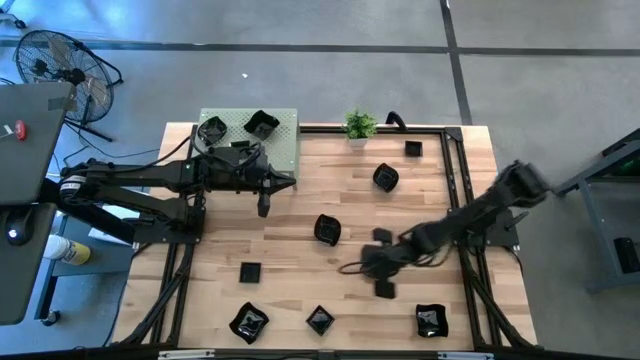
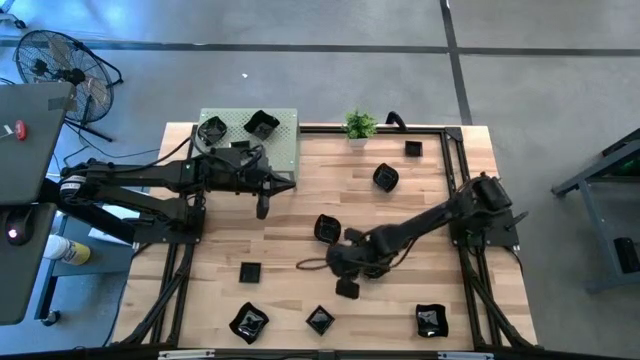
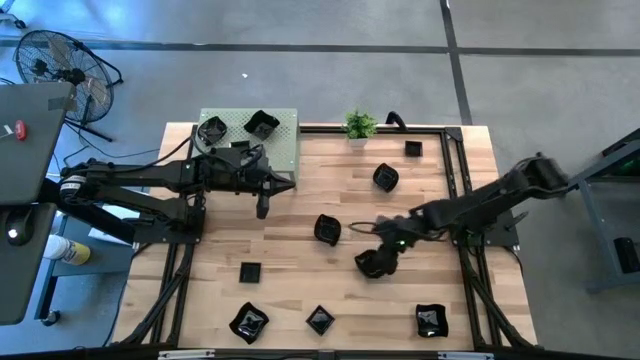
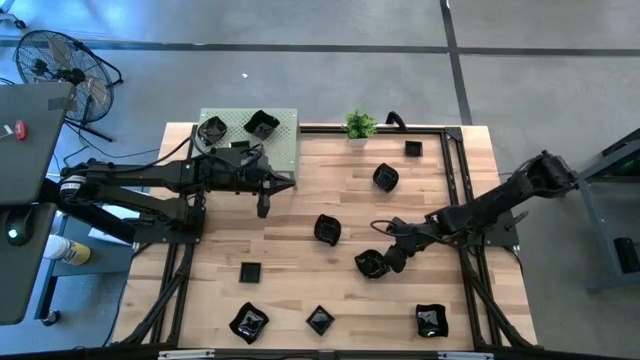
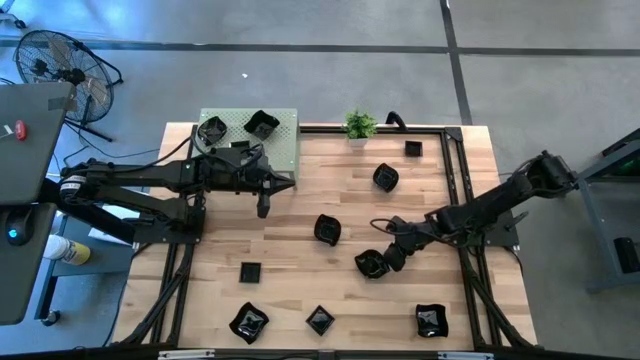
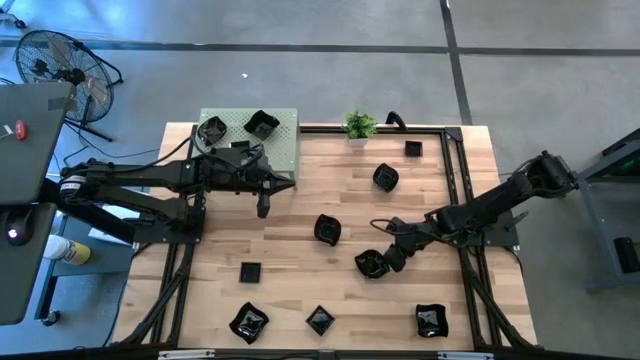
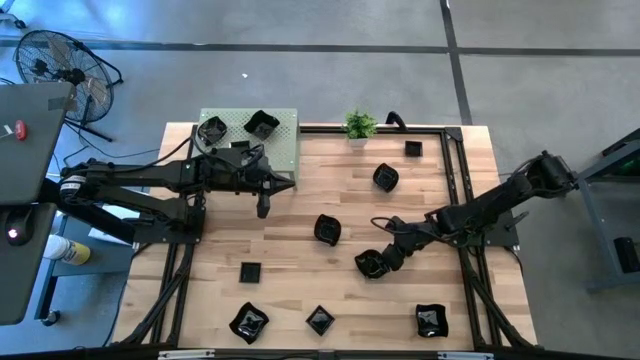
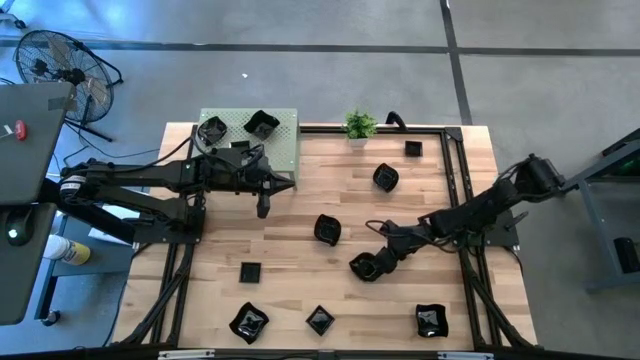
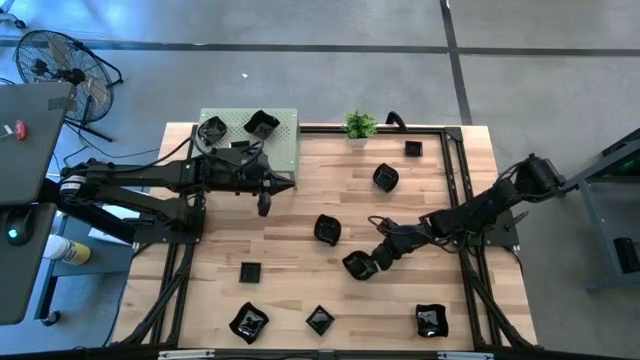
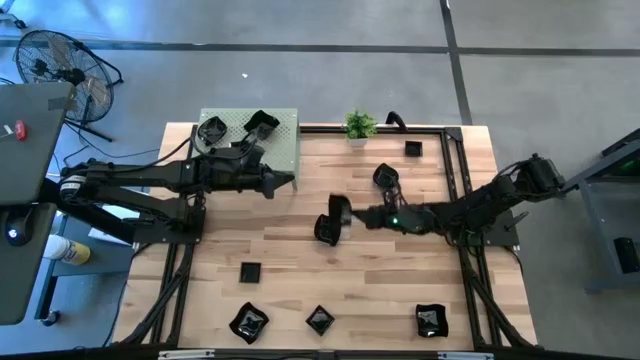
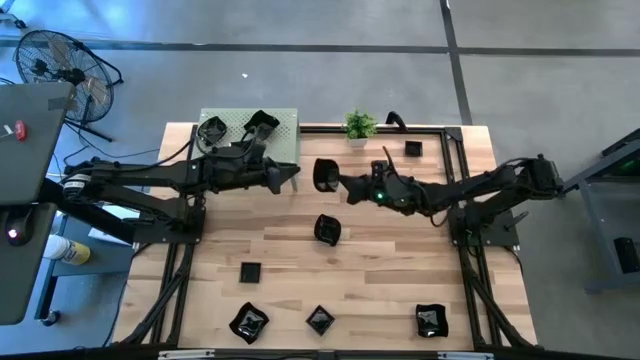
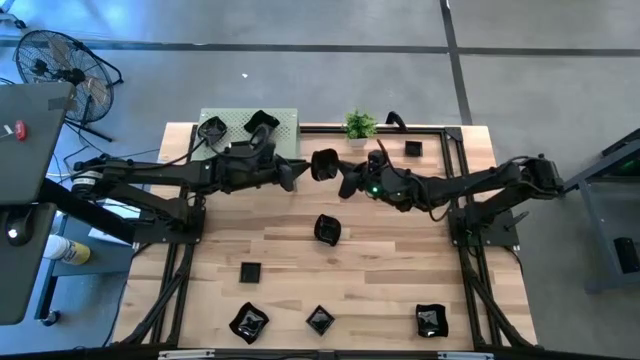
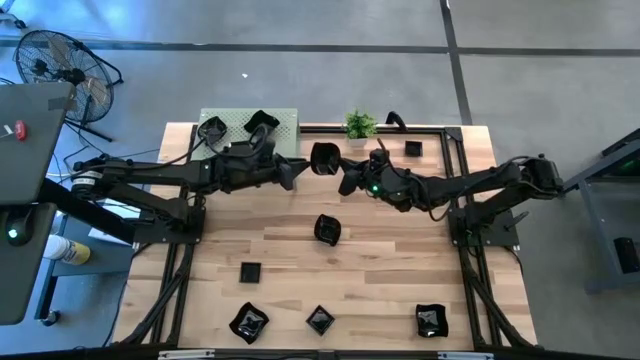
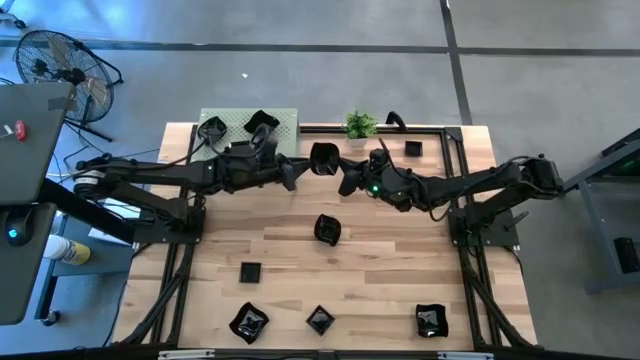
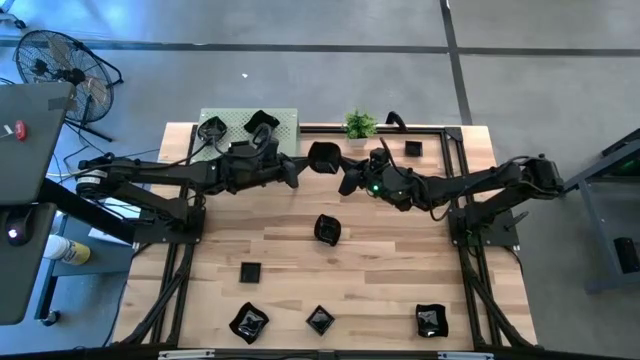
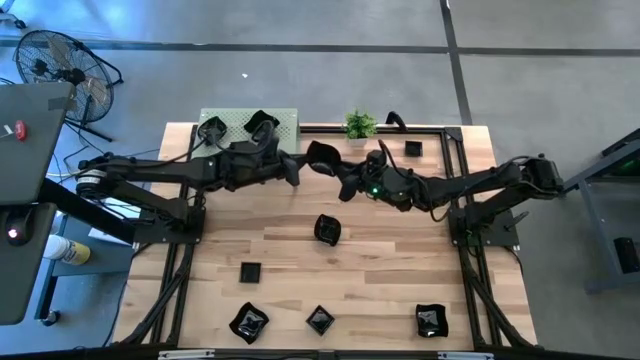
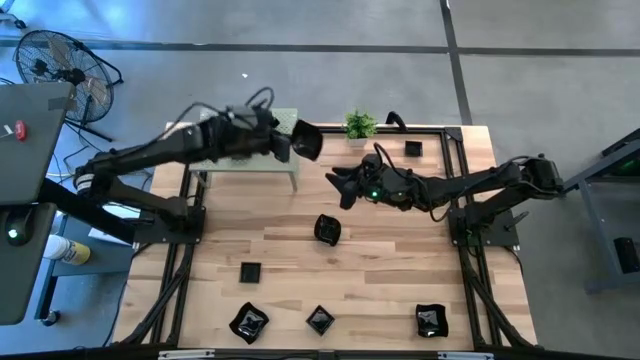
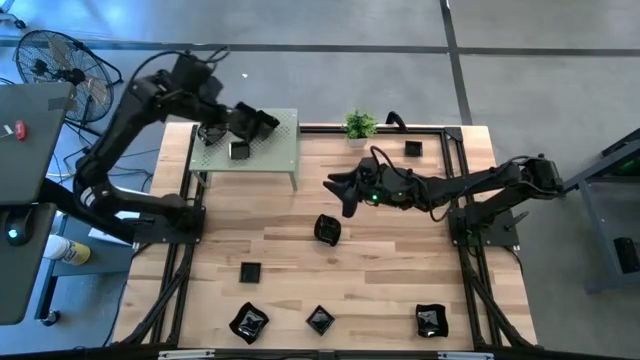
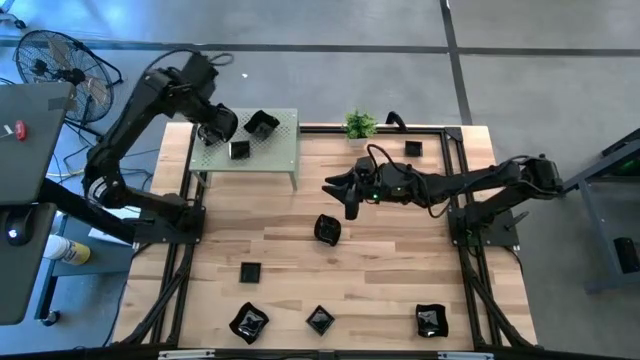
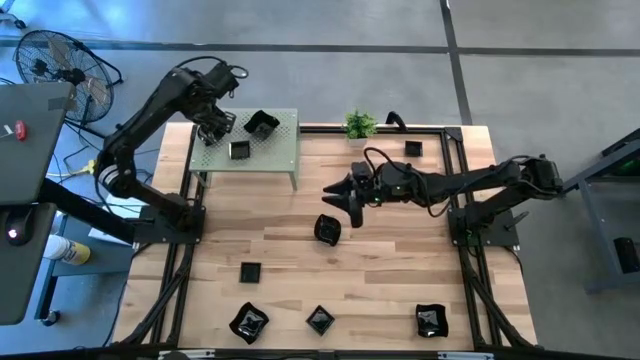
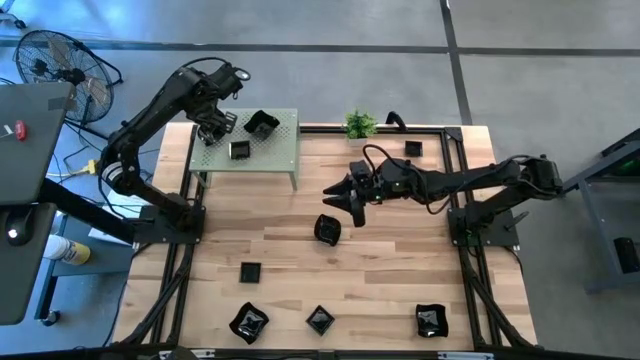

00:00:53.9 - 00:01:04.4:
Task: Pick & Place Mini shaped plates
Stack the black leaf-shaped plate on top of the black leaf-shaped plate on the shelf

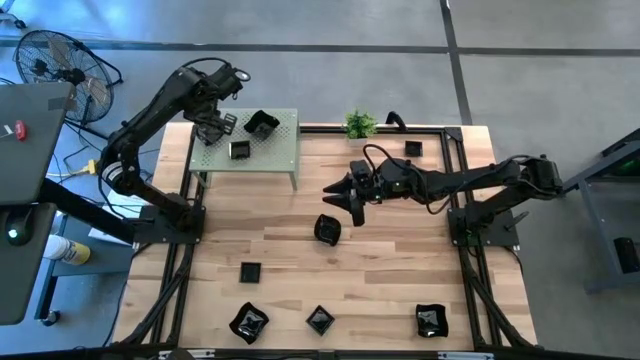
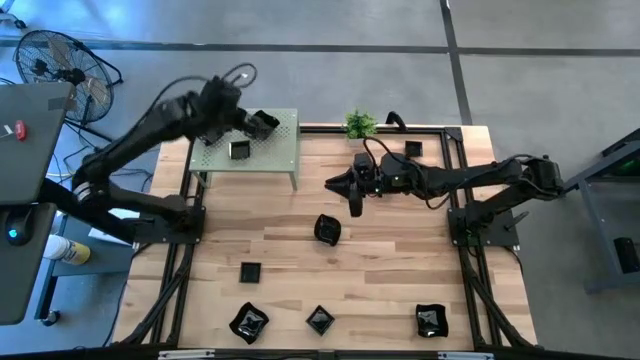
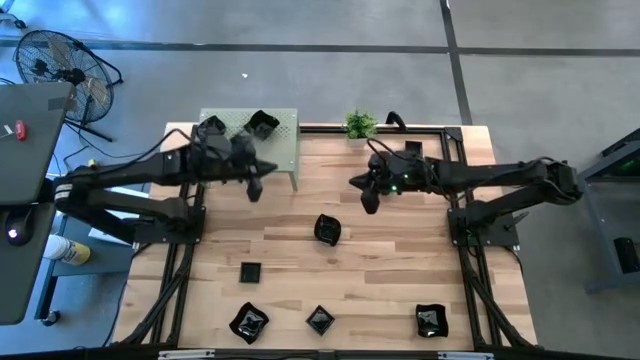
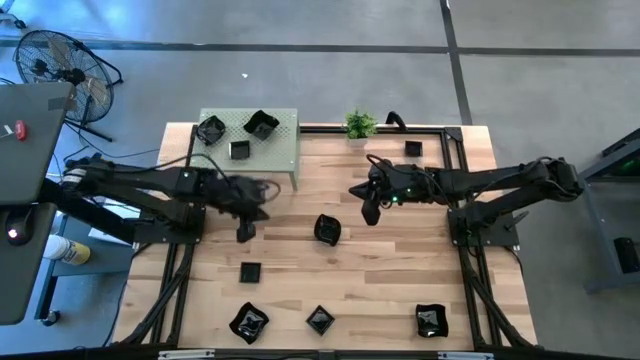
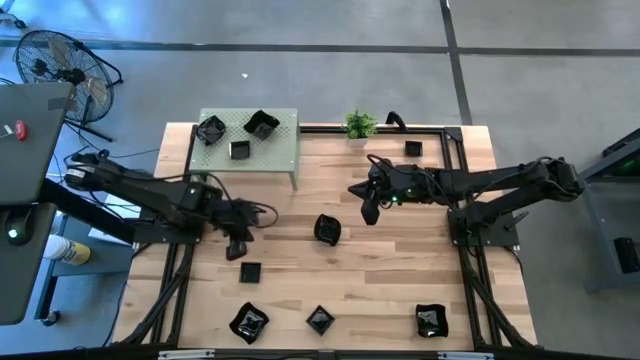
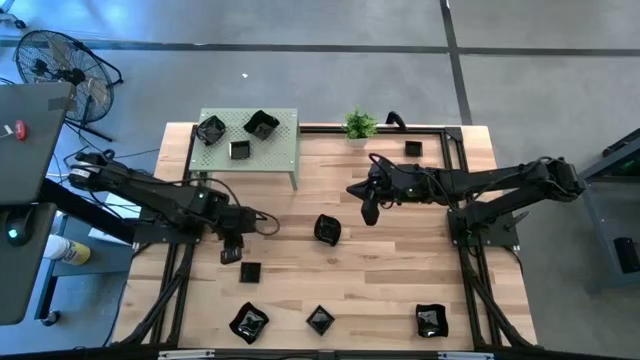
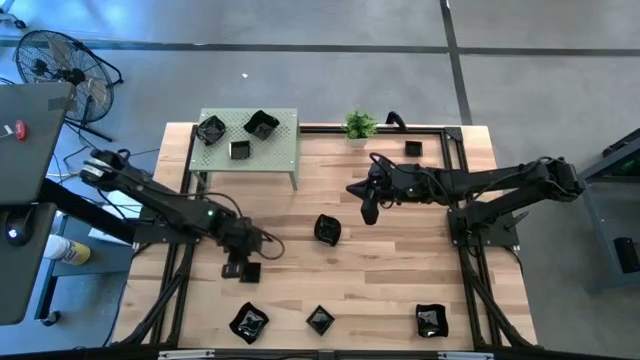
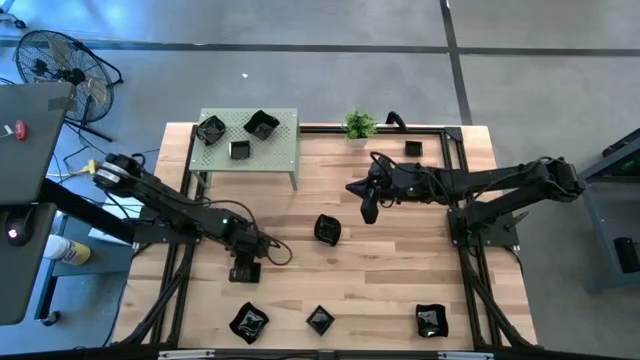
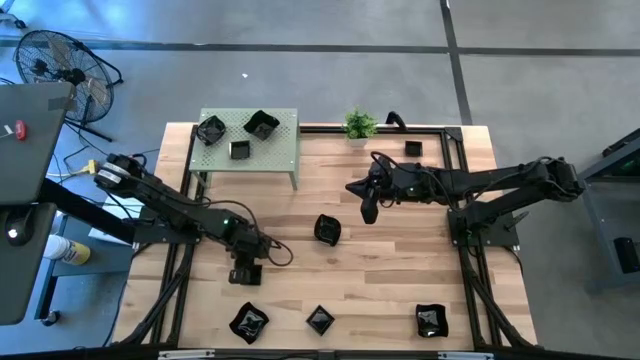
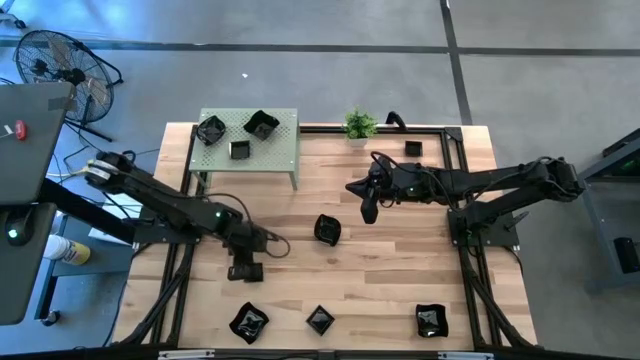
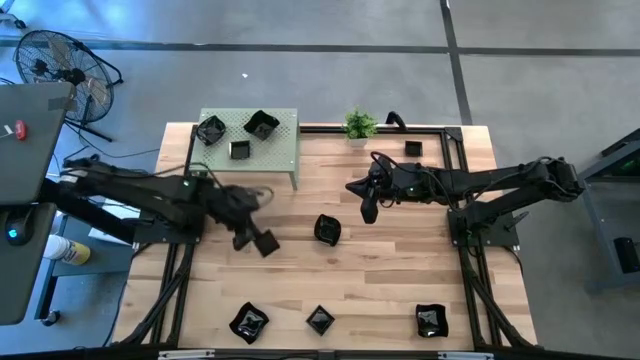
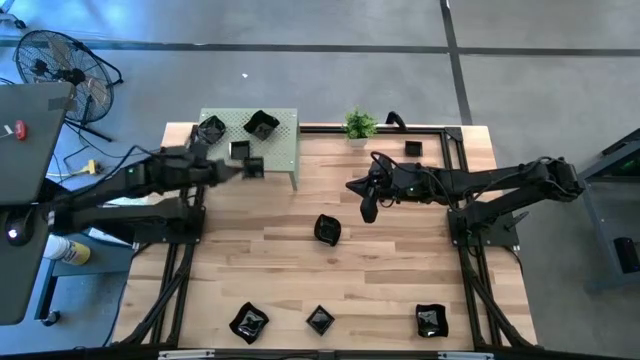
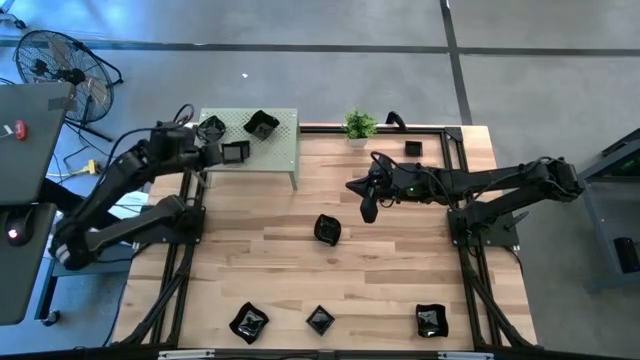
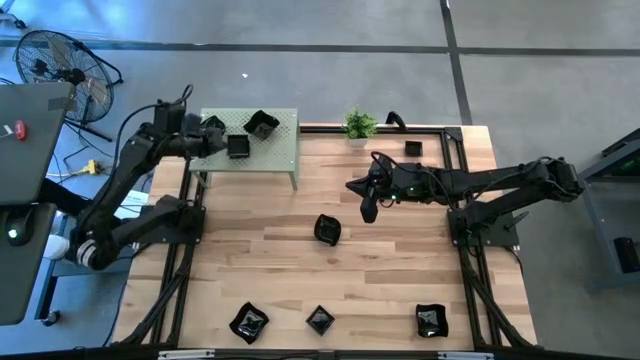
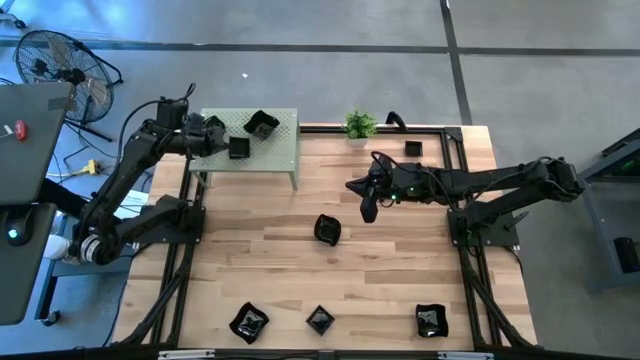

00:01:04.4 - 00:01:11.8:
Stack the black square plate on top of the black square plate on the shelf

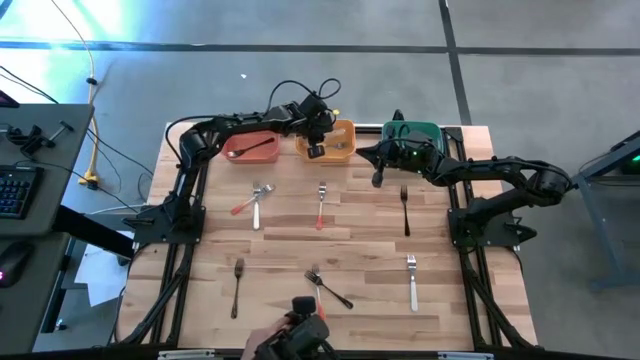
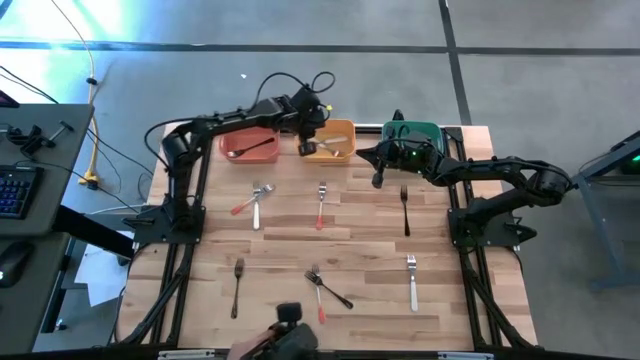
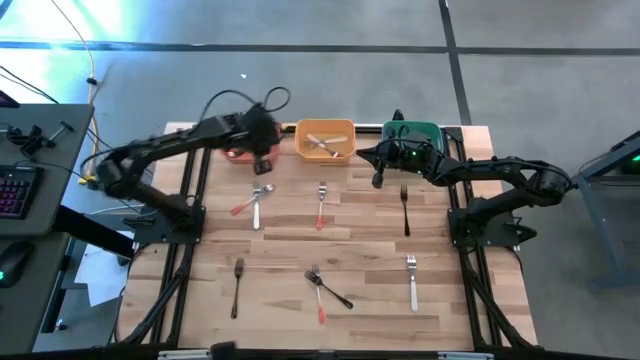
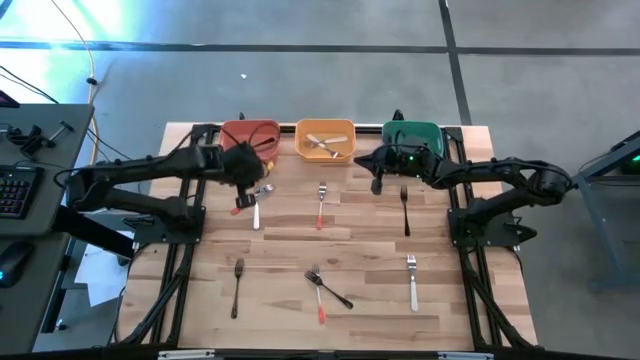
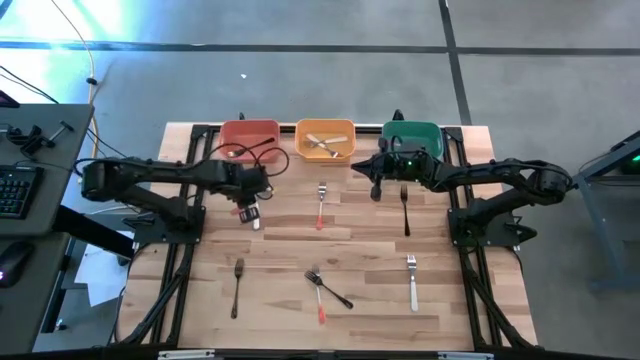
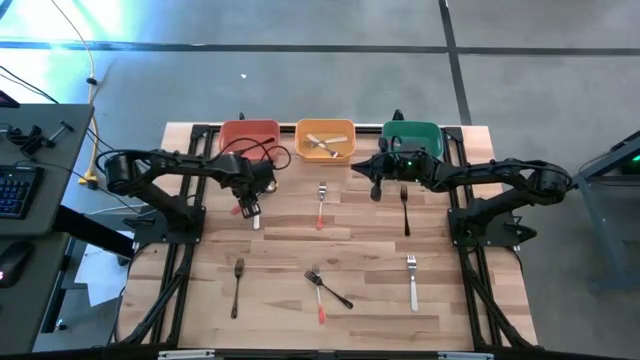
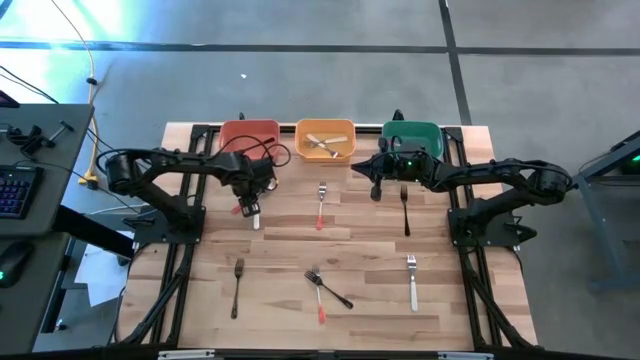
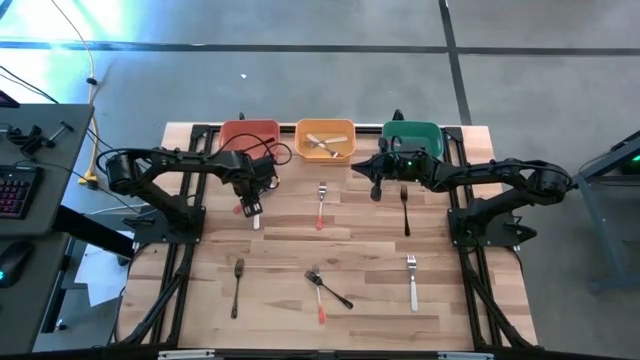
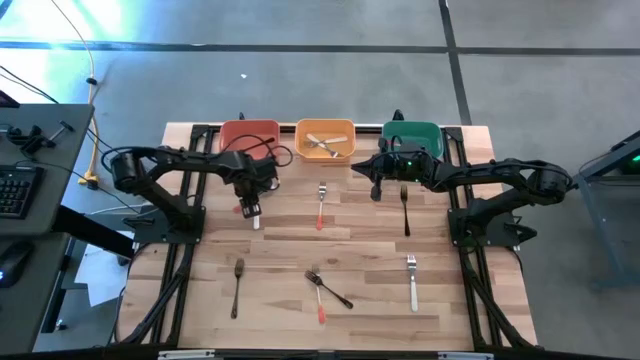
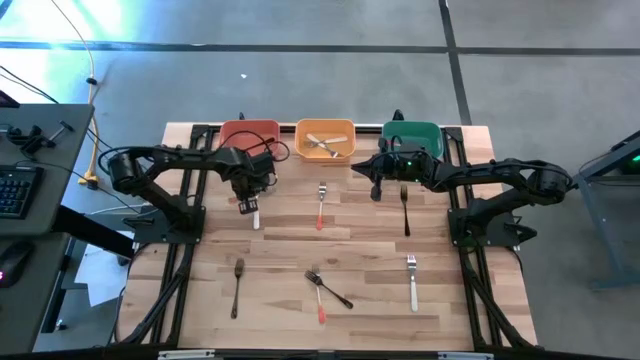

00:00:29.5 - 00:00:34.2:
Task: Sort silverware by color (type)
Put the top left orange fork into the green bin
